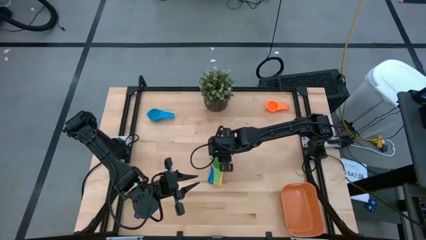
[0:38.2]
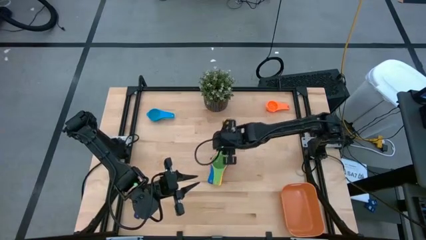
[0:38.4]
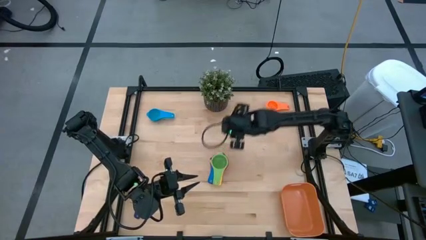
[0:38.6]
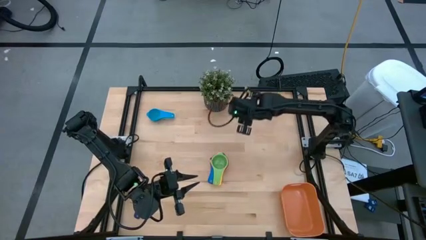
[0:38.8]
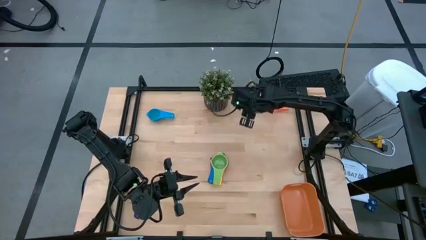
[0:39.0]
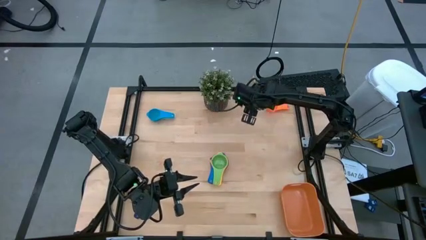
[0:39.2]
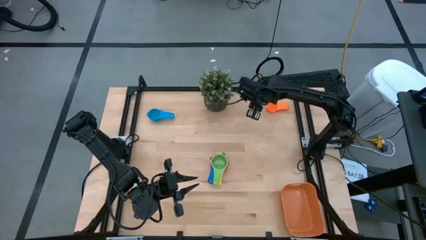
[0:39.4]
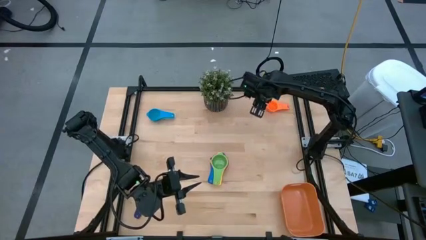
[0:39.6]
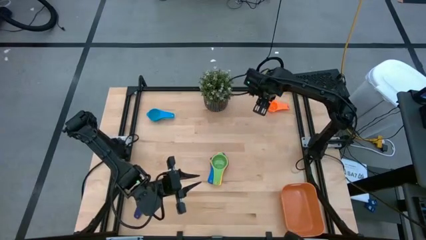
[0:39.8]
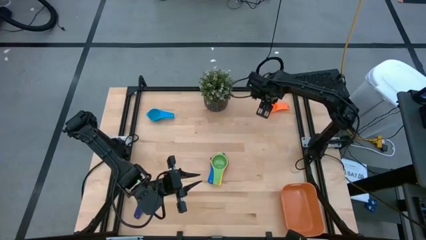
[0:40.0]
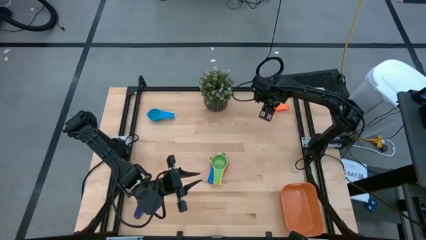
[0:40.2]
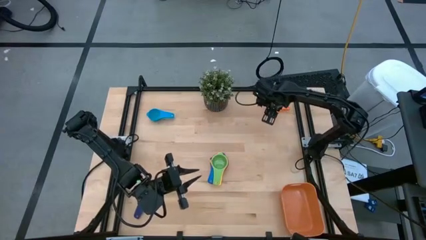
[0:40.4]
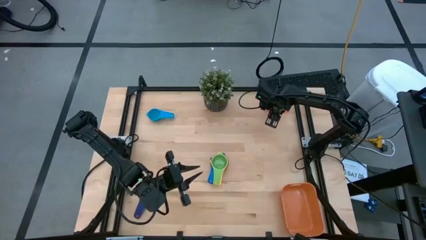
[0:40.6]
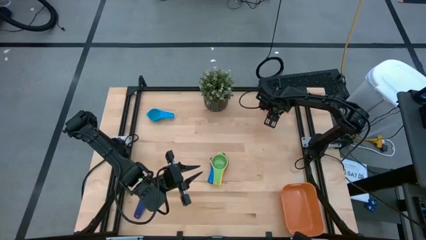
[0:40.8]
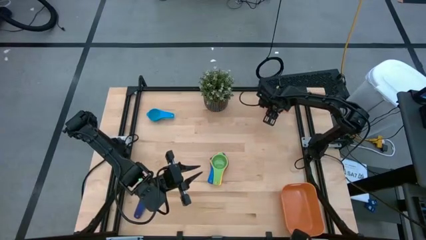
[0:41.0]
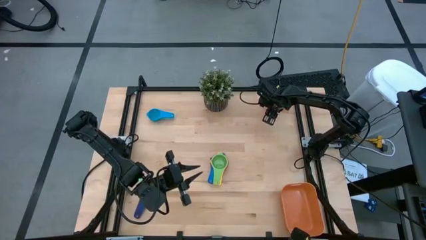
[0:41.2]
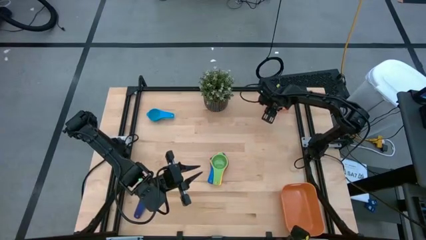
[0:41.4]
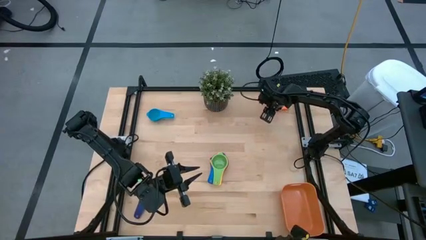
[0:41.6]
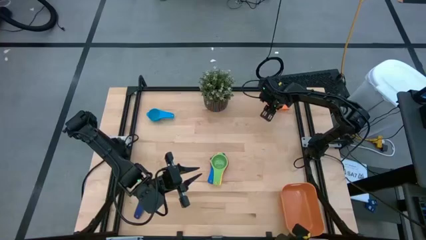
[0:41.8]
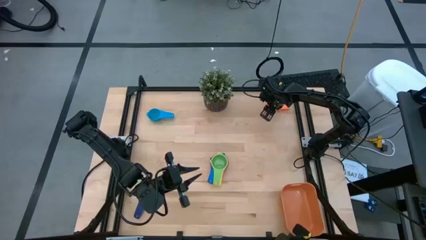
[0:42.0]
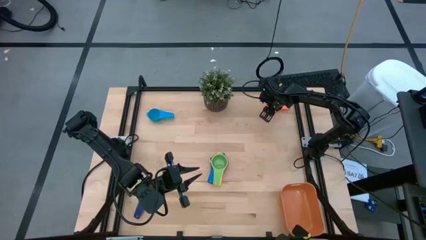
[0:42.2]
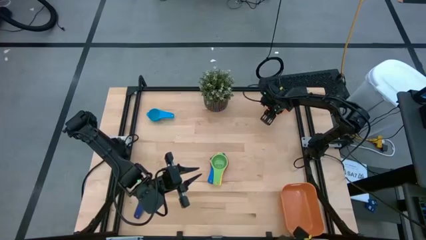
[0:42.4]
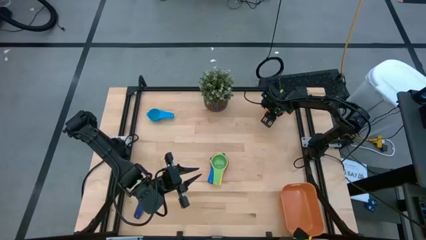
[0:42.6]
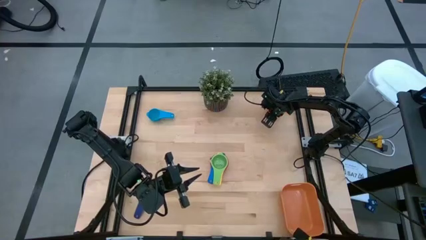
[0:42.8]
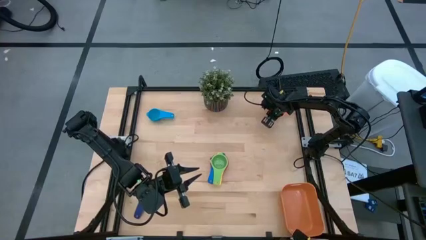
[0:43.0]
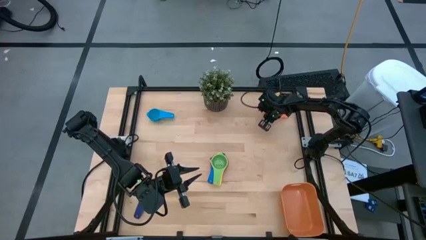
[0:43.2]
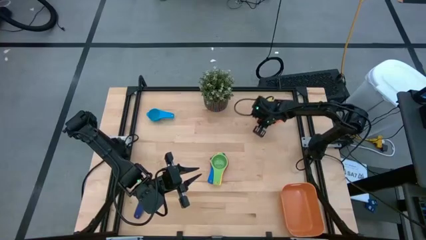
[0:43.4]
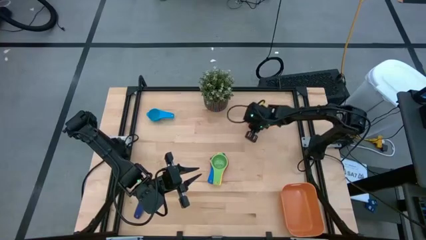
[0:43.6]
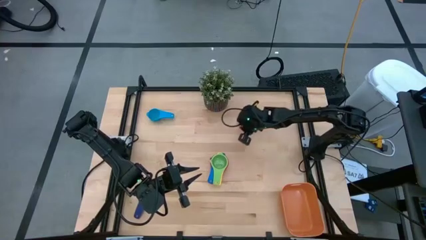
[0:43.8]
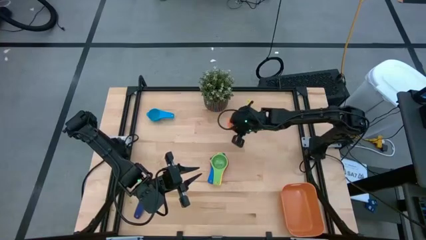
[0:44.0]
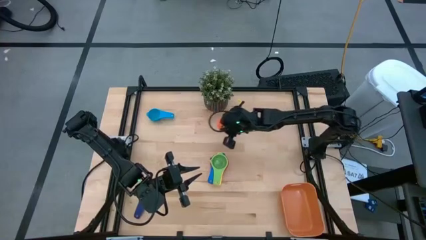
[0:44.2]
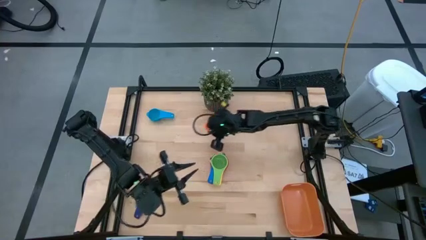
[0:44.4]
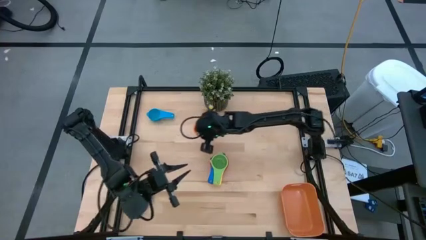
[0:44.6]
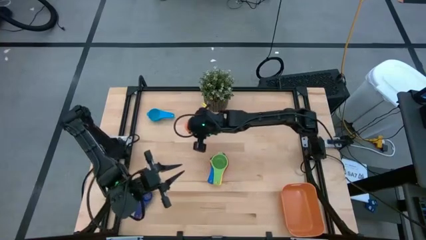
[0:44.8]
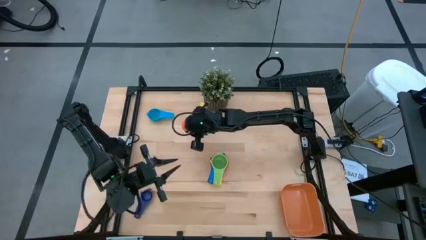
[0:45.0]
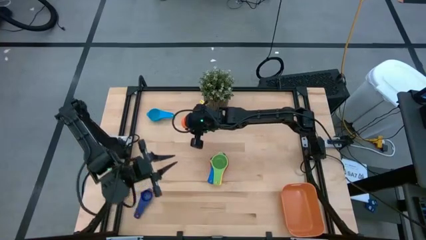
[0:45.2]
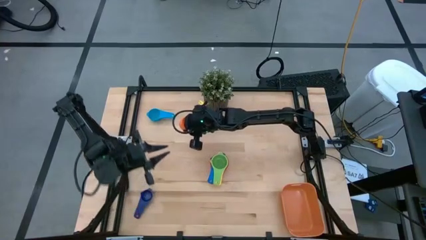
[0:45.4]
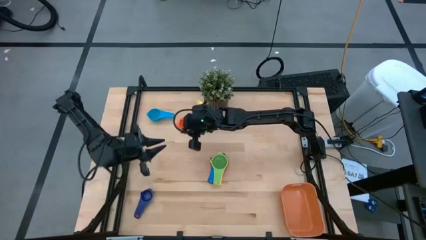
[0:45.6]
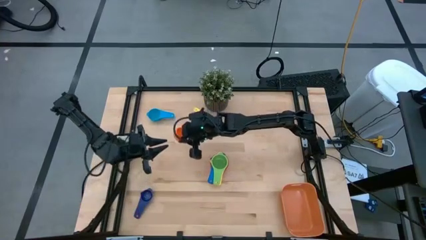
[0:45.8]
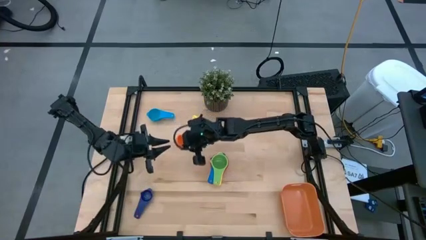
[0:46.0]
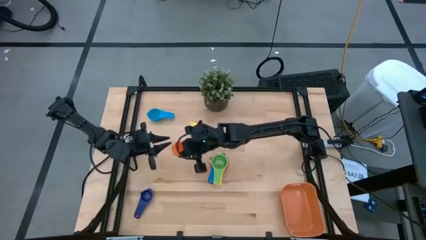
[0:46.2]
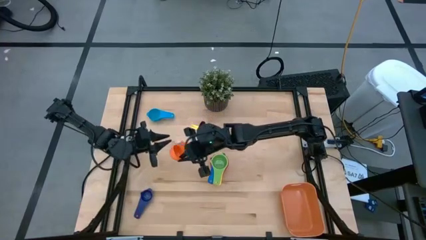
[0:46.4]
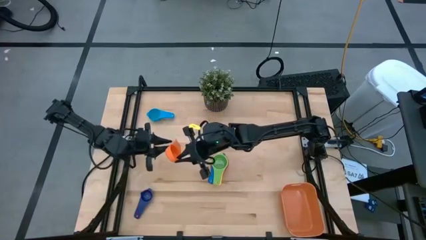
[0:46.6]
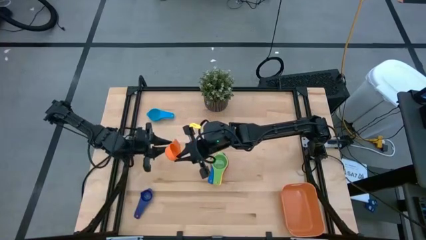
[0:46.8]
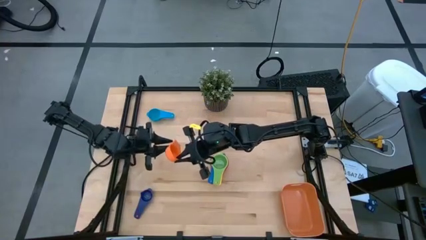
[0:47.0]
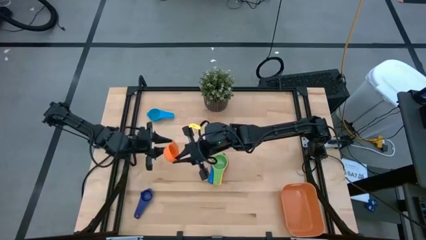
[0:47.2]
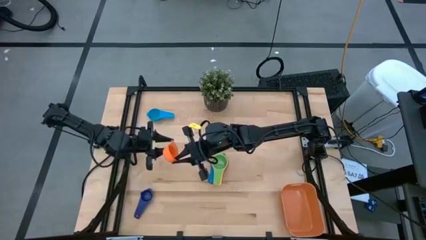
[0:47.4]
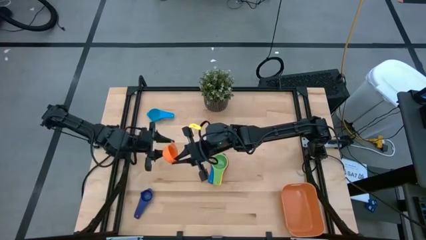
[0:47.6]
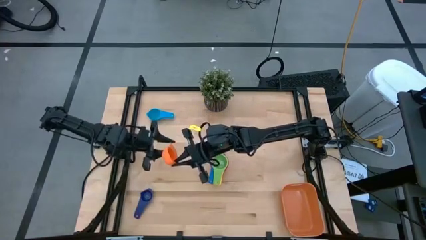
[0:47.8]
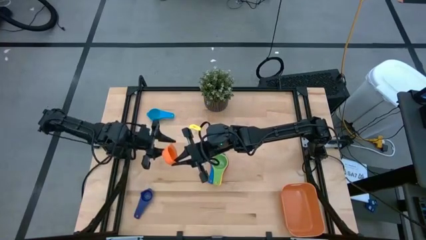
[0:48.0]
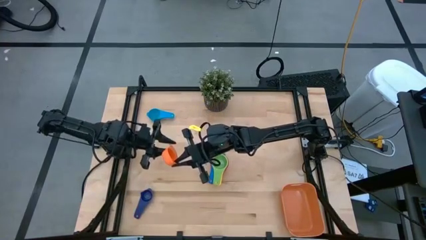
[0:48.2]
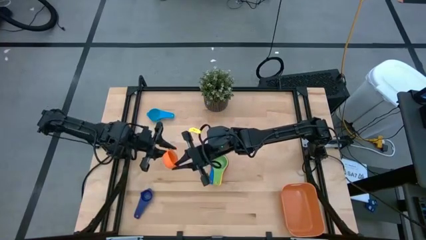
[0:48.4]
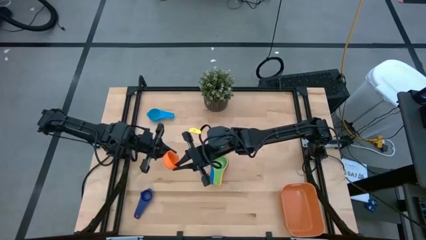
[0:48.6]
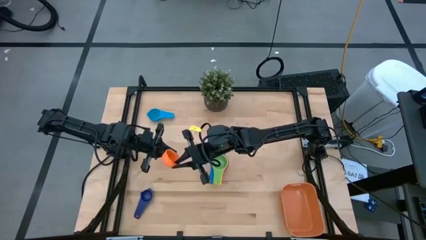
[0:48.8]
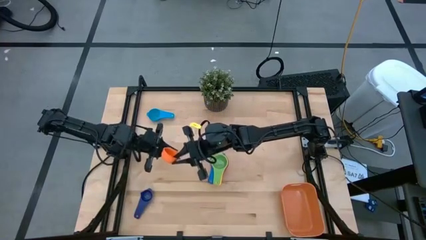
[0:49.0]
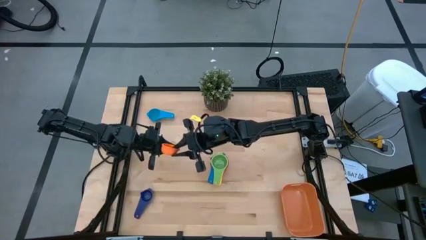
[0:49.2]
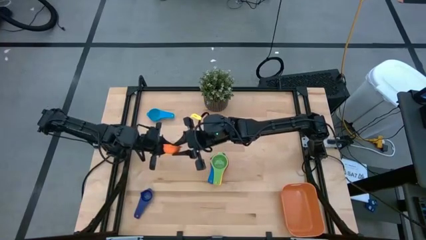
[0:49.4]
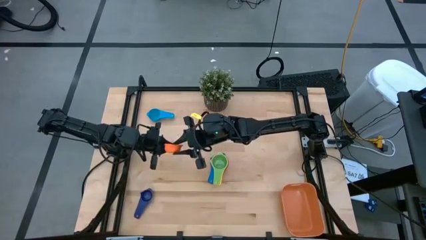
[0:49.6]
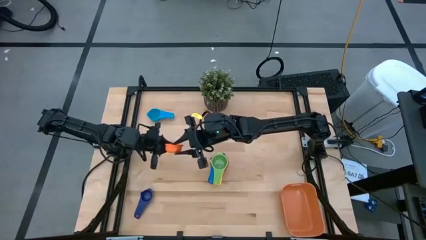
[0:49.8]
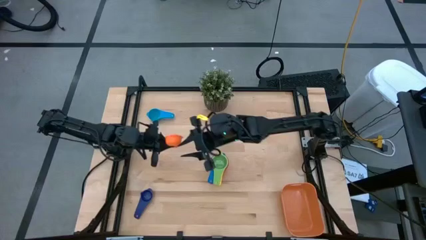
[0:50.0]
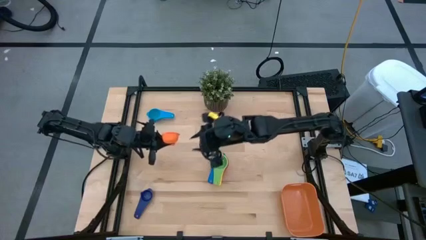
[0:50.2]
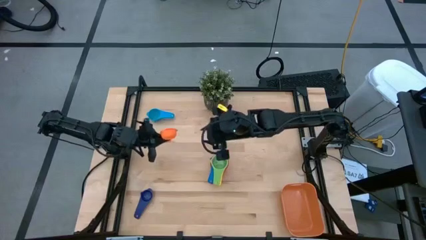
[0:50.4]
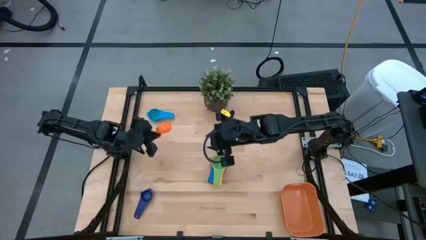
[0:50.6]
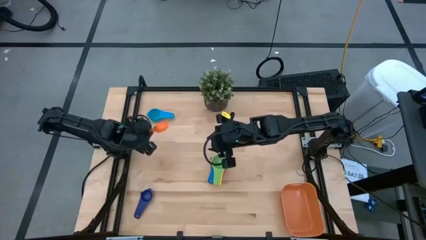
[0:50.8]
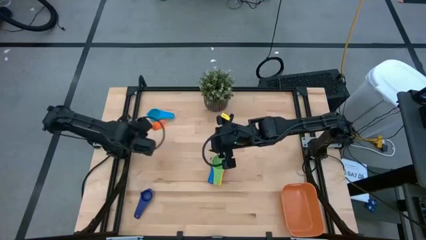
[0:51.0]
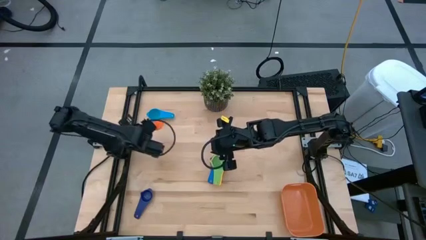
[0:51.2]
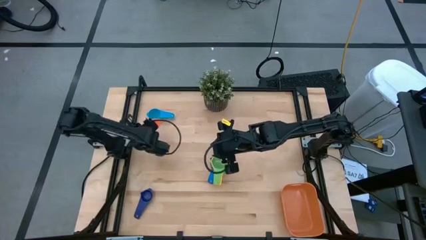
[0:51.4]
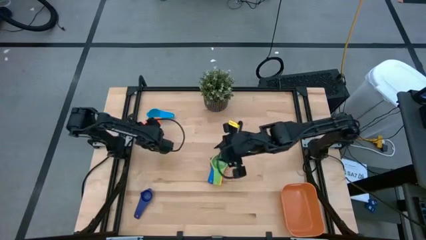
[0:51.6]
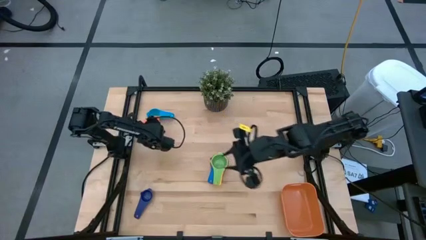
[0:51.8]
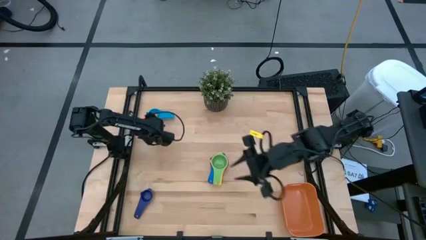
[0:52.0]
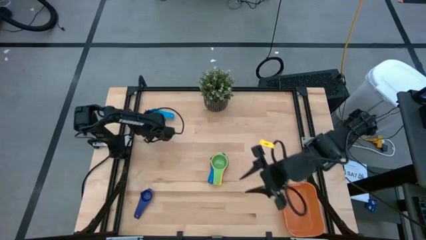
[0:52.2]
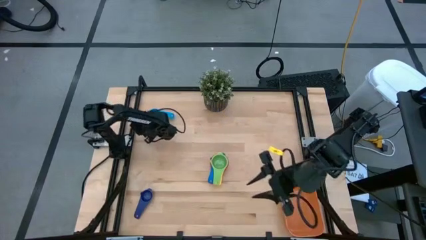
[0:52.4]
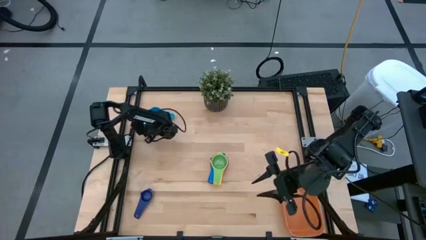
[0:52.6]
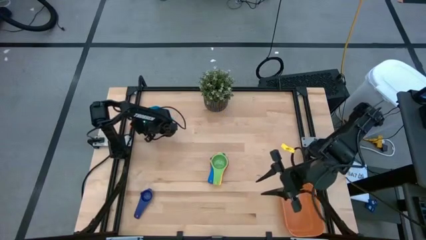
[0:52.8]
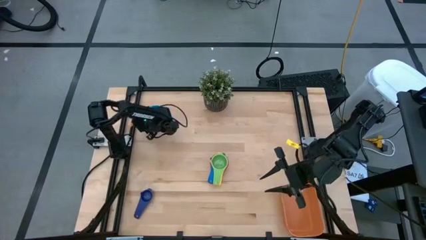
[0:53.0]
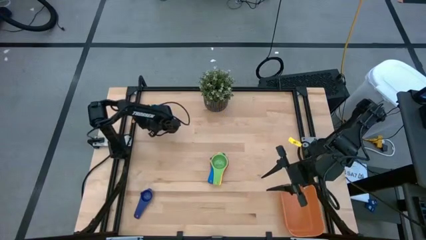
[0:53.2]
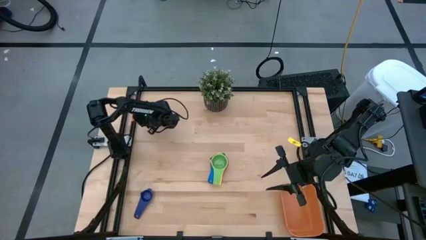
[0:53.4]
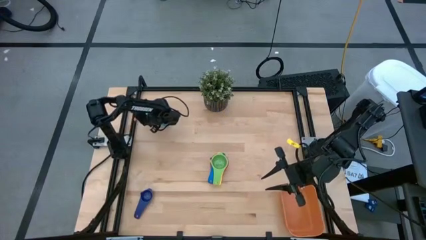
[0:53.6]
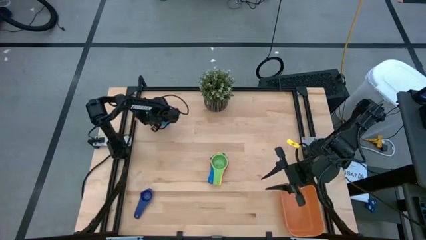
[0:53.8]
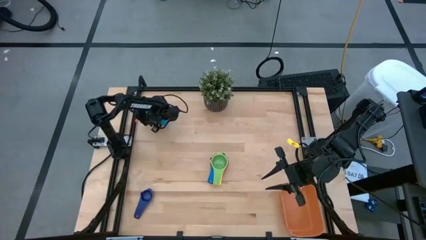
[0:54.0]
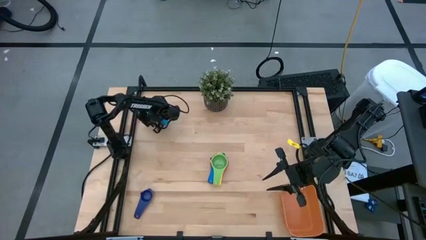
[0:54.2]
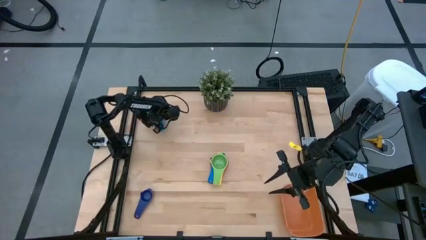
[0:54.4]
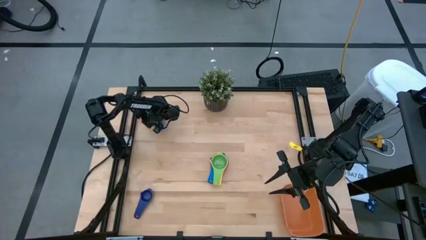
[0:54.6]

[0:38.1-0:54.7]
Task: Nest measuring cups in basket
Stack the orange measuring cup on top of the light blue measuring cup
